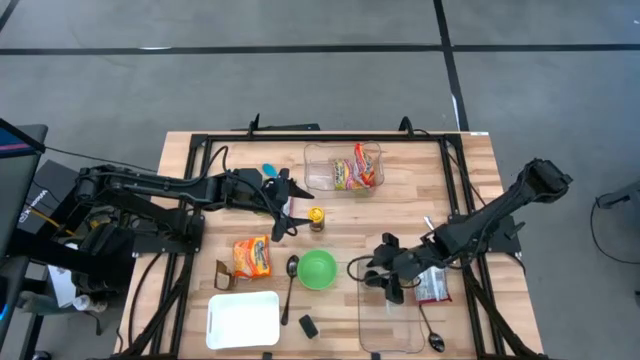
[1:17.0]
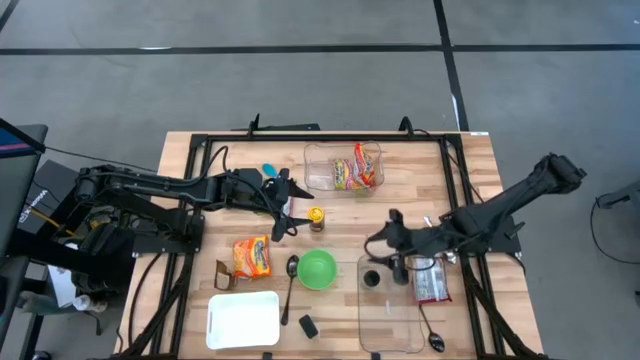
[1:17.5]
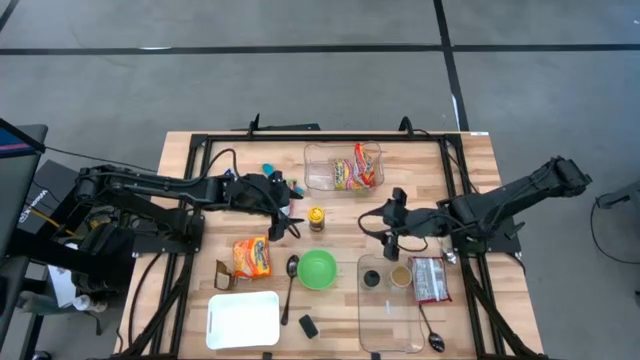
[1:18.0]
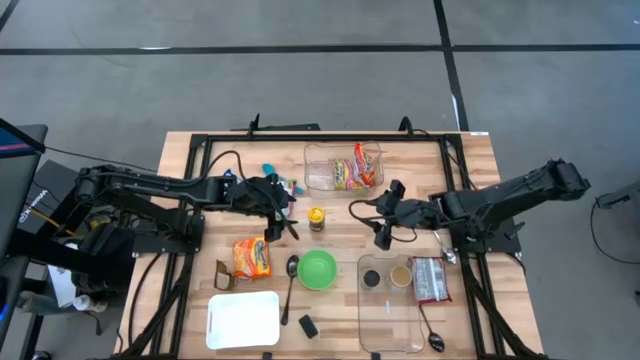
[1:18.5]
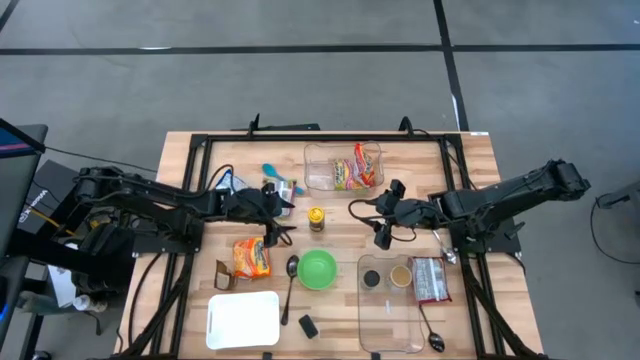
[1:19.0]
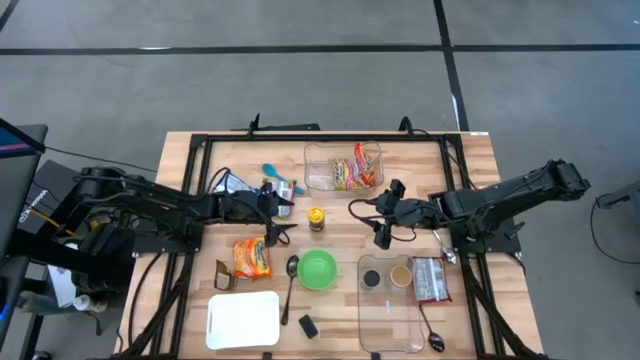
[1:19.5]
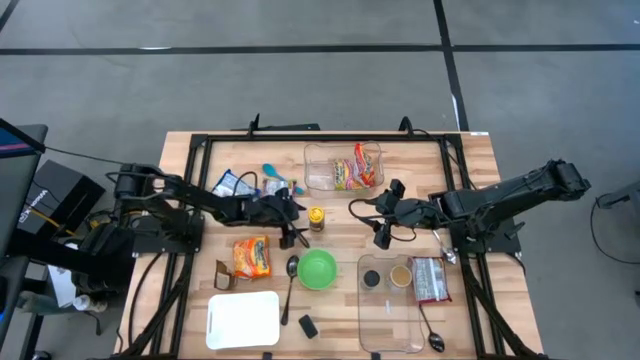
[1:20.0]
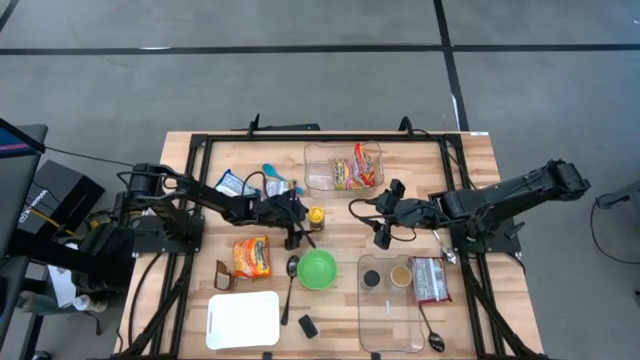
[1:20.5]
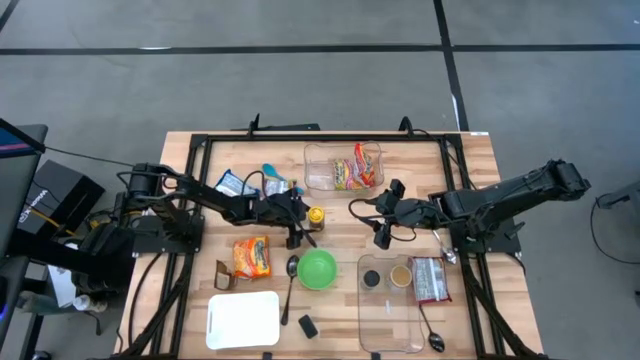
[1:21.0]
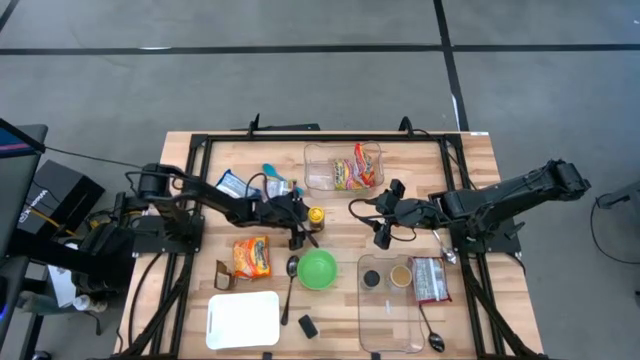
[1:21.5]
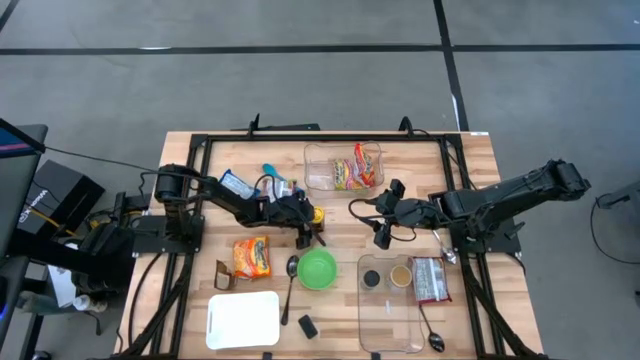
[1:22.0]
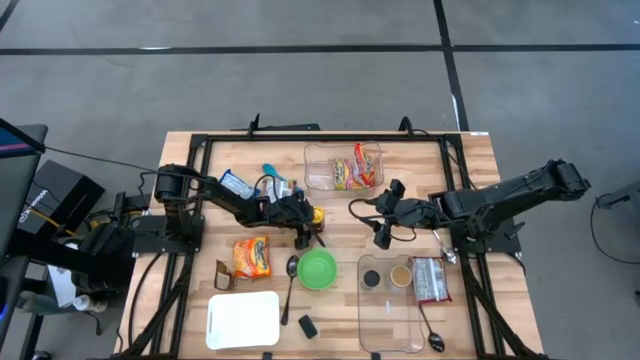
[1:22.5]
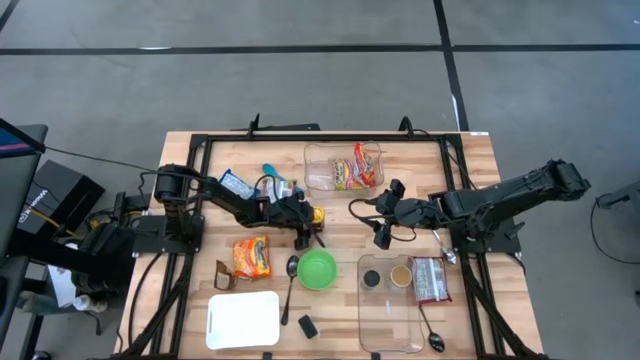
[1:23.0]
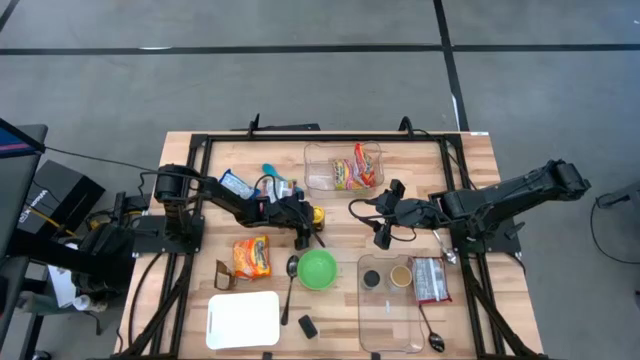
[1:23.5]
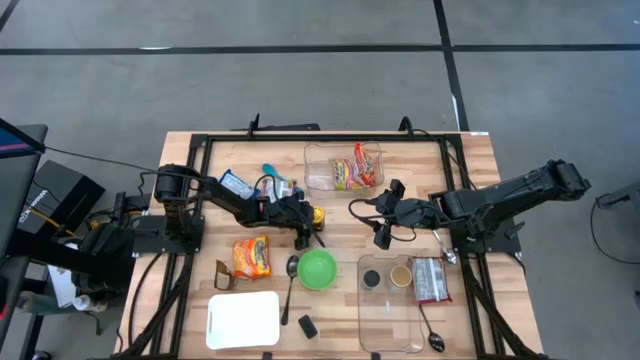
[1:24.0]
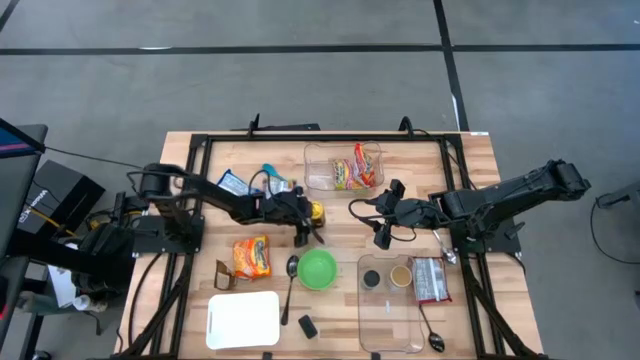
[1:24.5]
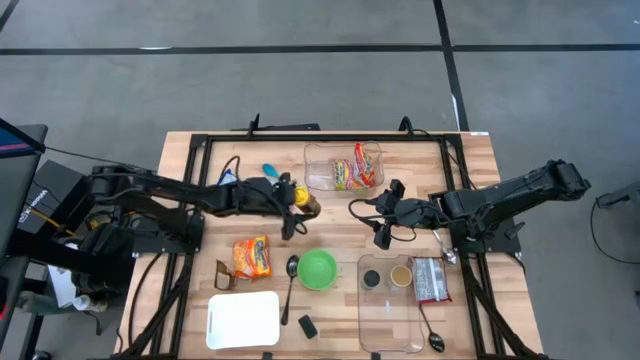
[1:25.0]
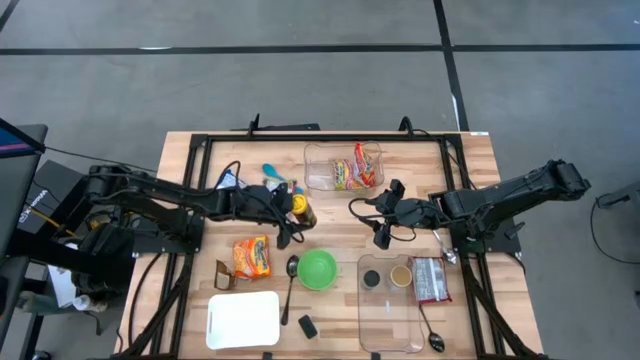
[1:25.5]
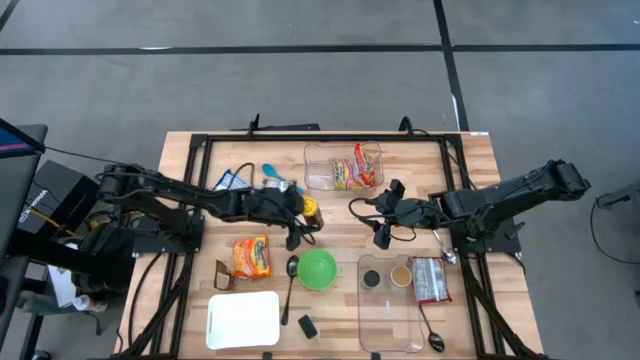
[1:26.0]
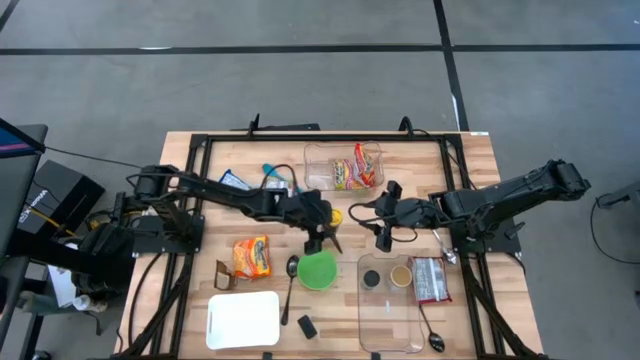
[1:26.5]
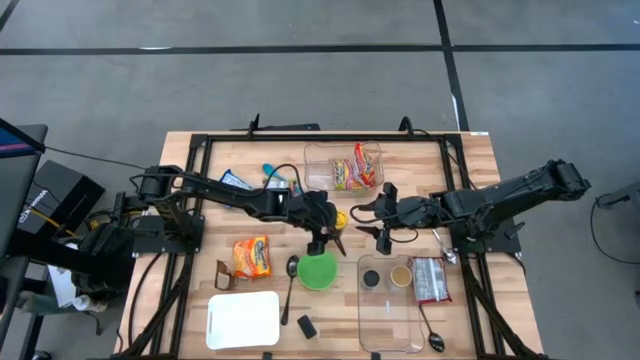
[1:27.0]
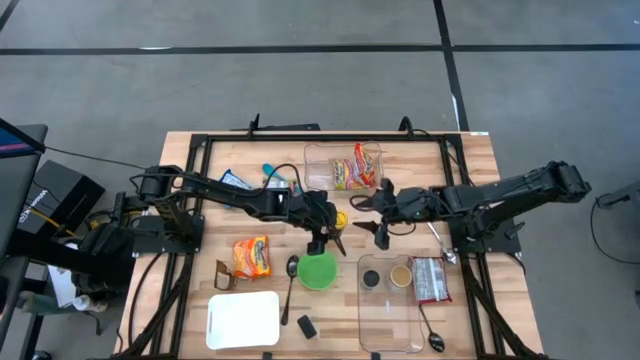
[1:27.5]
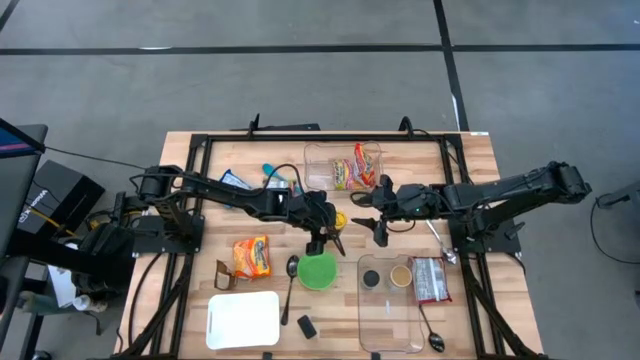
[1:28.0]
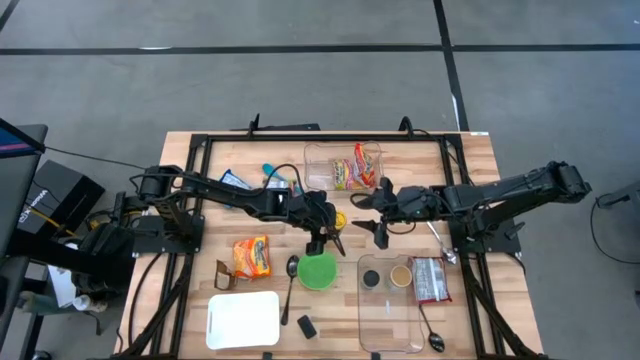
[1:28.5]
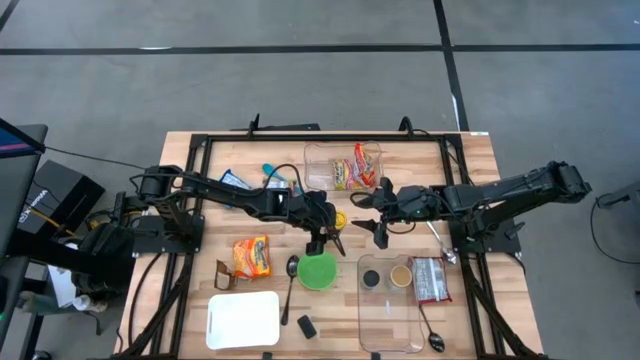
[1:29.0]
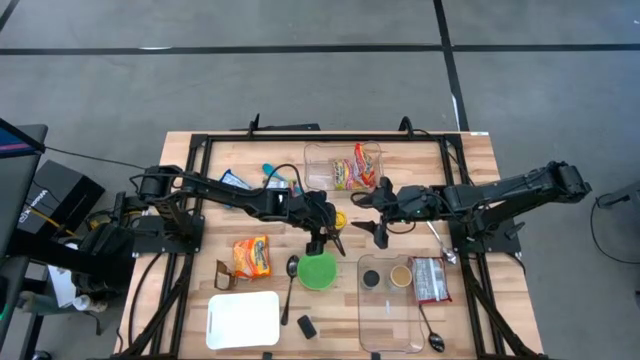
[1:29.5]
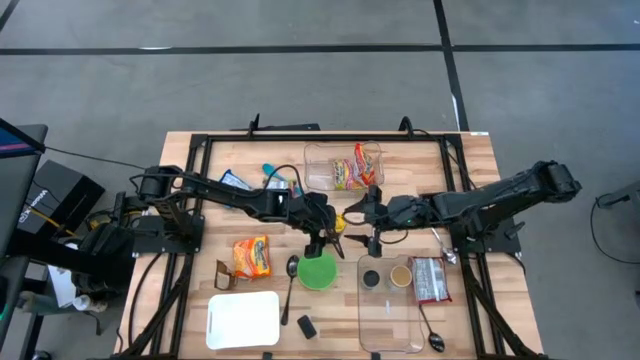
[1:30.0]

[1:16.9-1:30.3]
Task: Pick & Place Food Item
Put the black seasoning into the bottom transparent bin

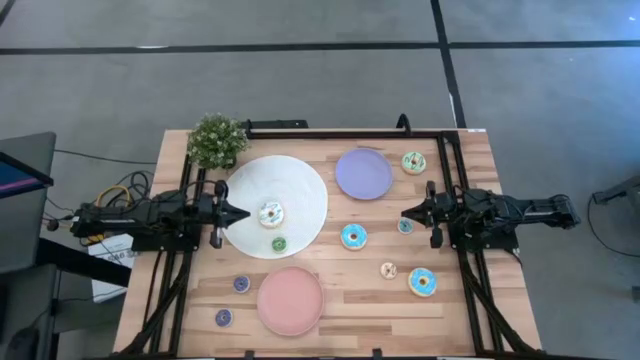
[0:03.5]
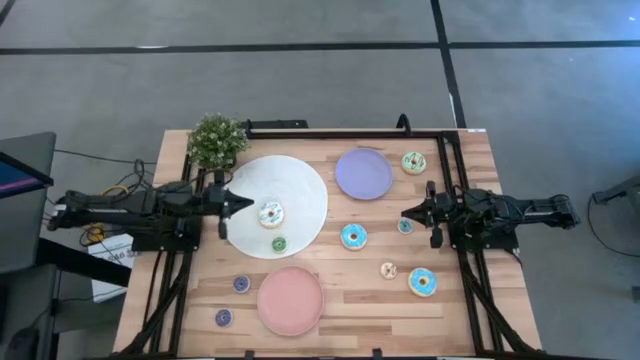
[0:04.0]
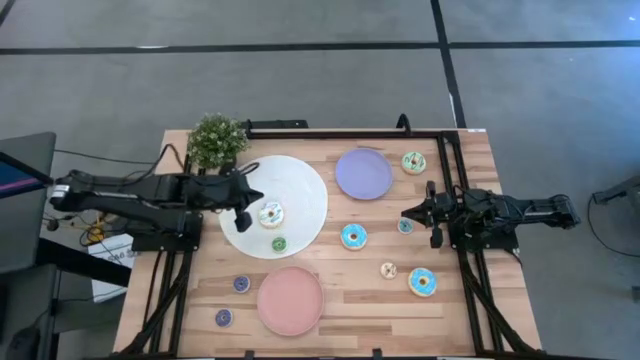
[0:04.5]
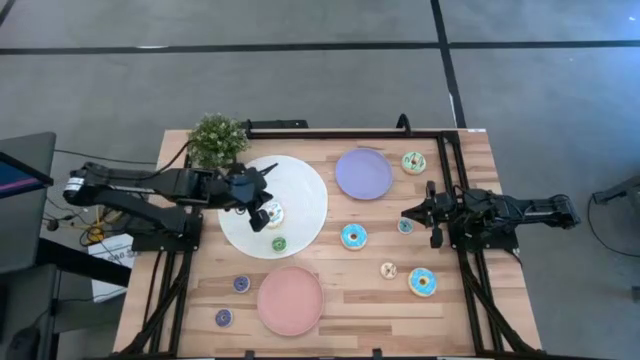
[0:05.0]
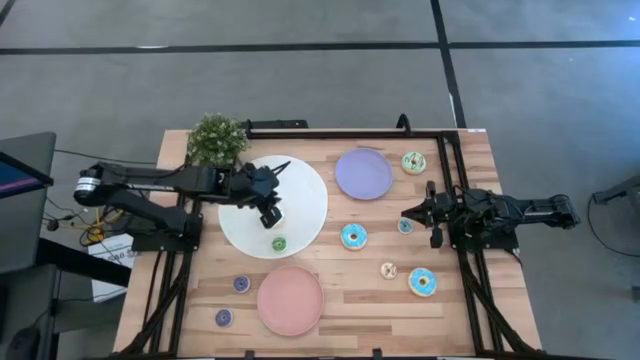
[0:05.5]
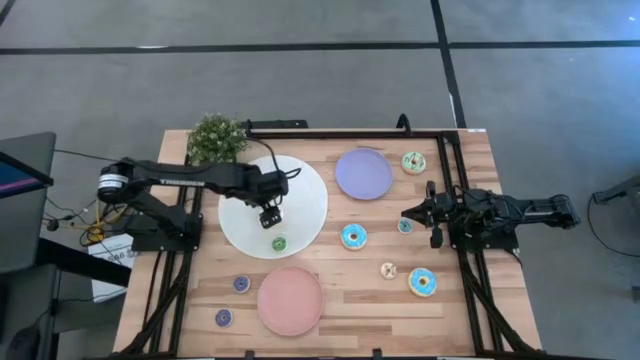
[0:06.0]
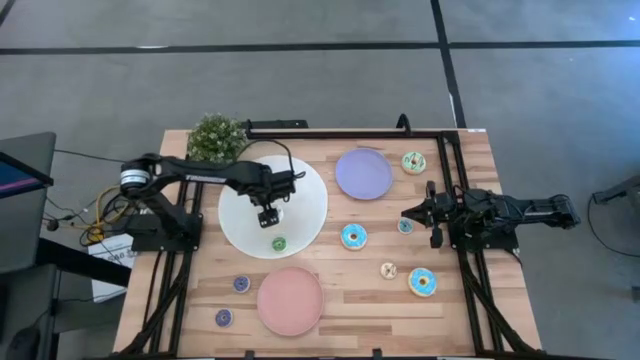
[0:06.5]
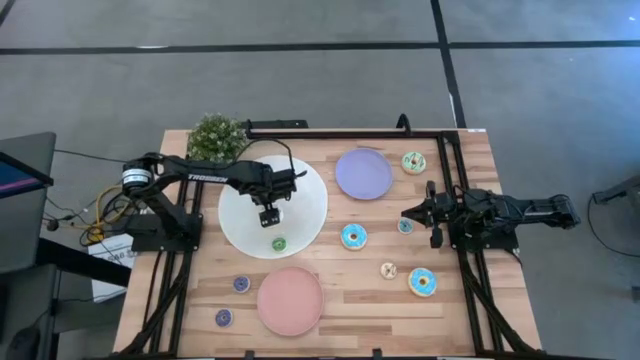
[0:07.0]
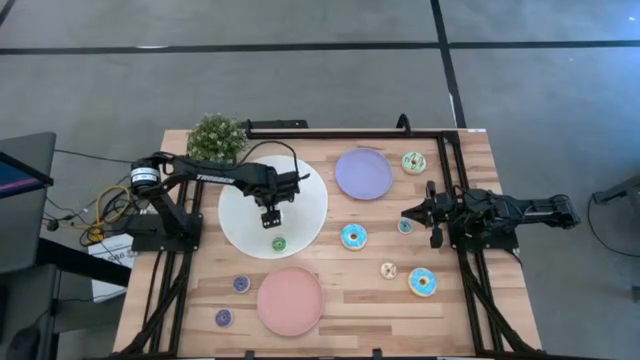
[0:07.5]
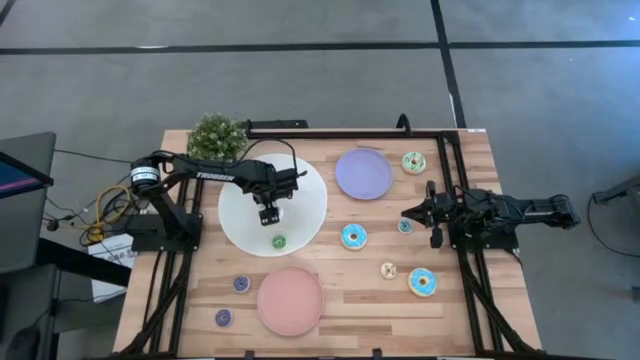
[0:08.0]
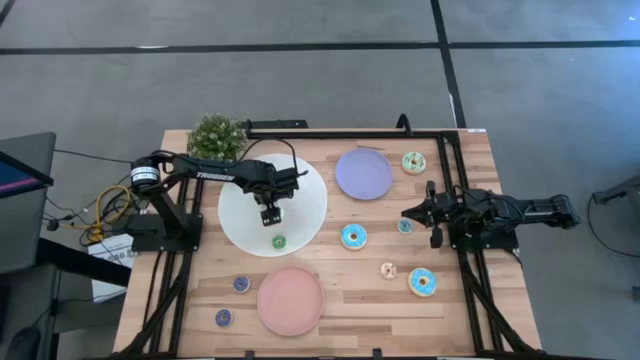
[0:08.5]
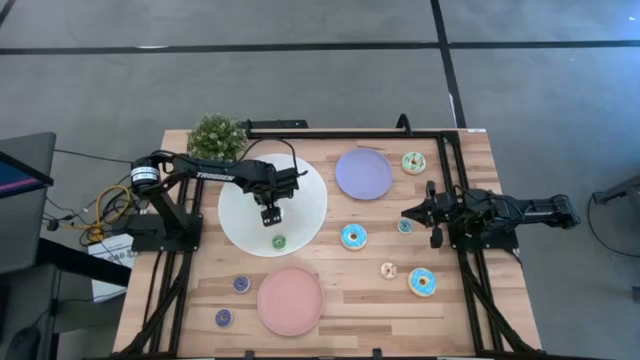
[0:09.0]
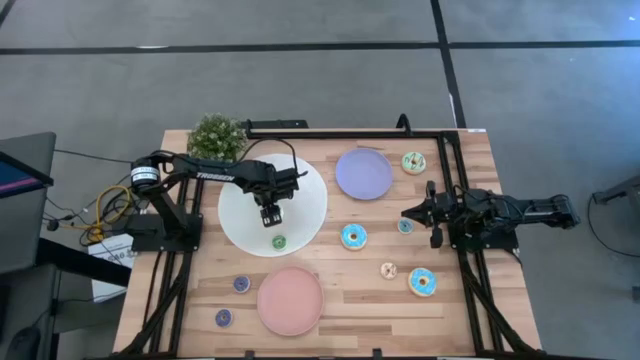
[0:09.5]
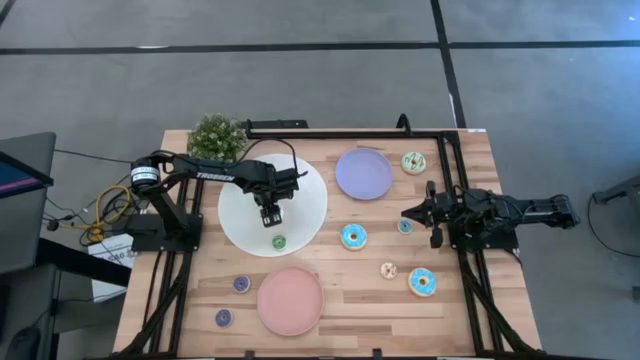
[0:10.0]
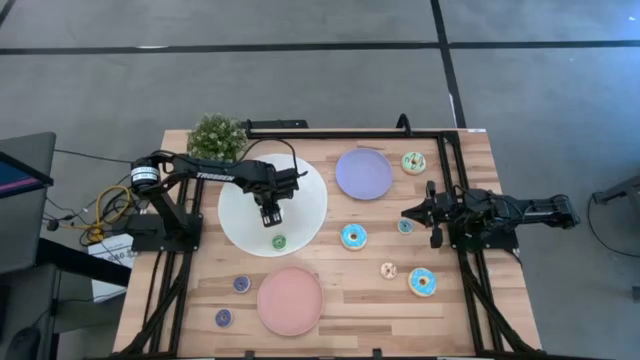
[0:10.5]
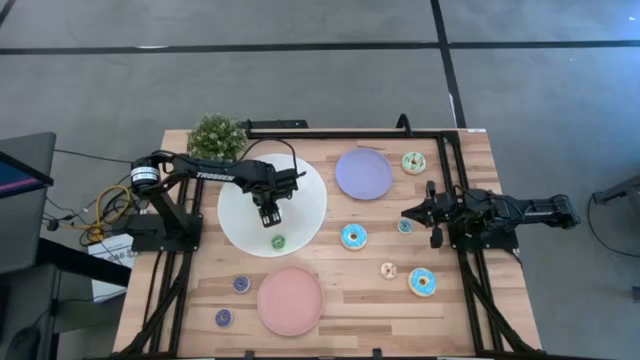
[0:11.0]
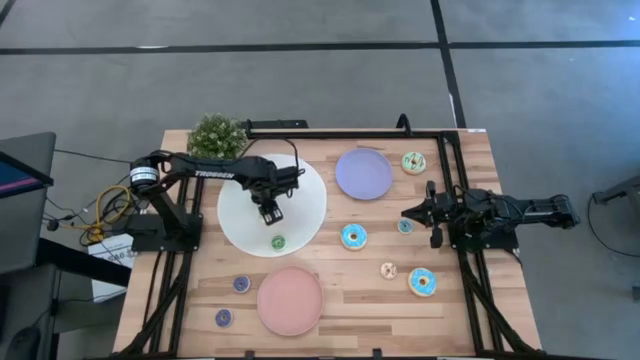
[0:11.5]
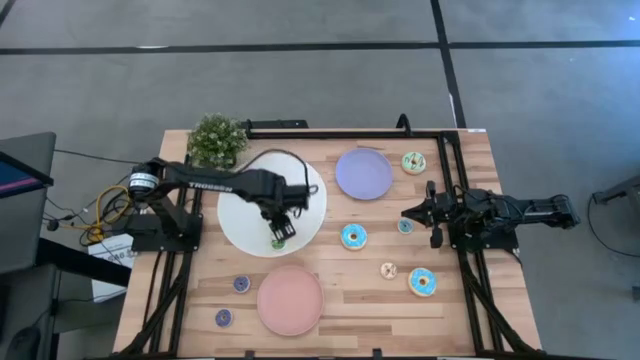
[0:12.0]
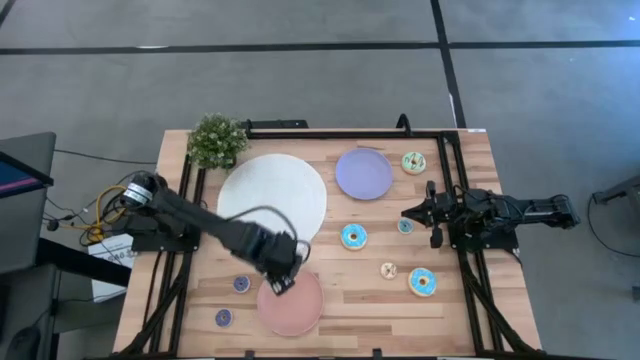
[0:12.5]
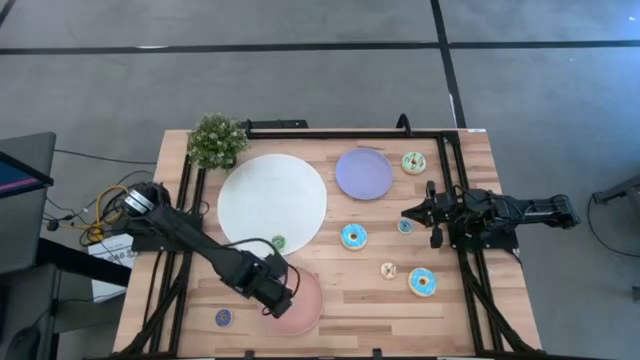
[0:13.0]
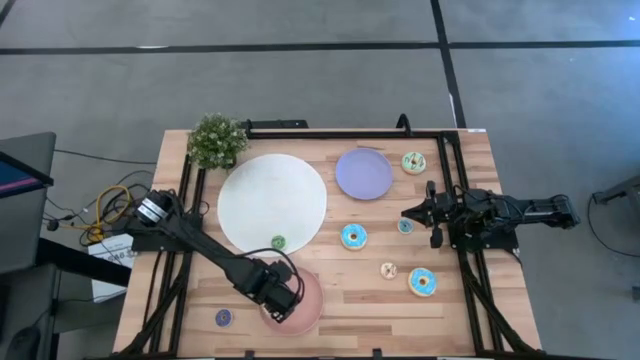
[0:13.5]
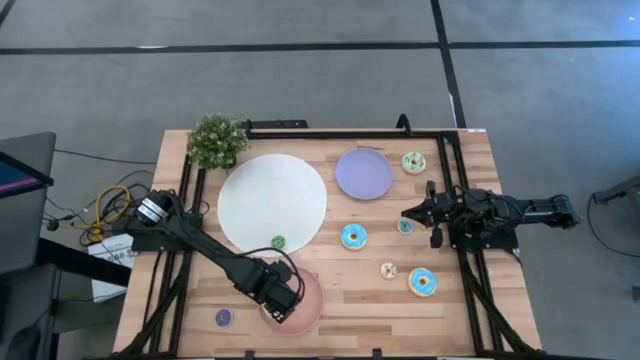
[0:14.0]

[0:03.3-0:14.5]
Task: Pick & Place donuts
Put the big white donut on the pink plate
